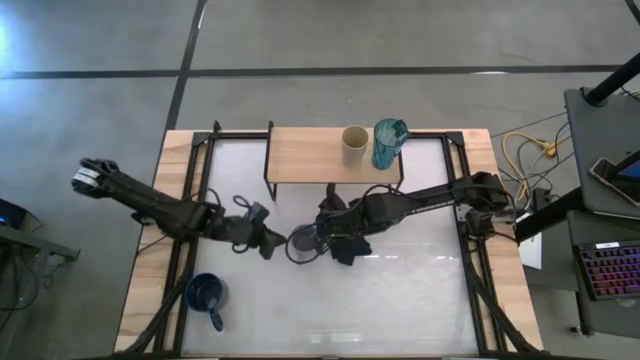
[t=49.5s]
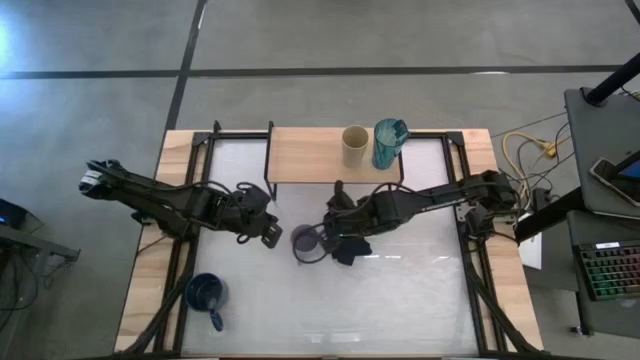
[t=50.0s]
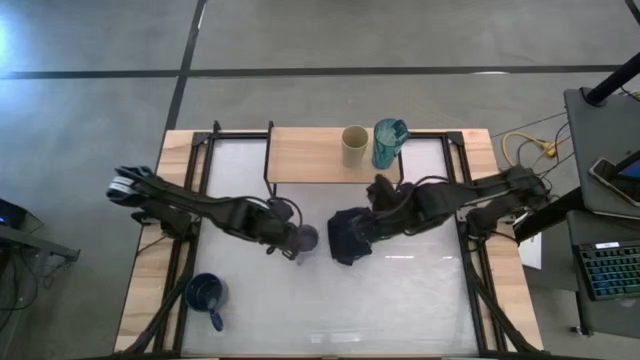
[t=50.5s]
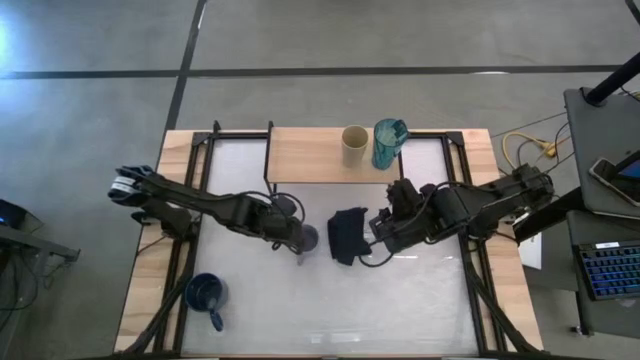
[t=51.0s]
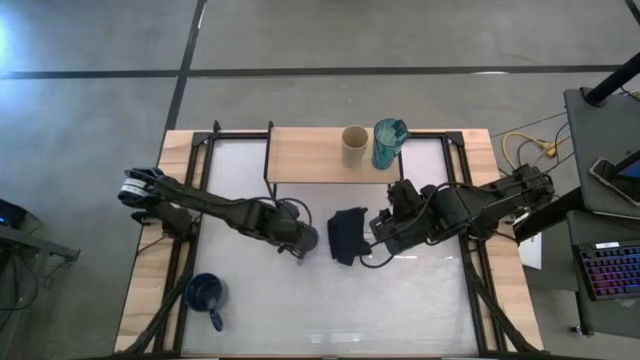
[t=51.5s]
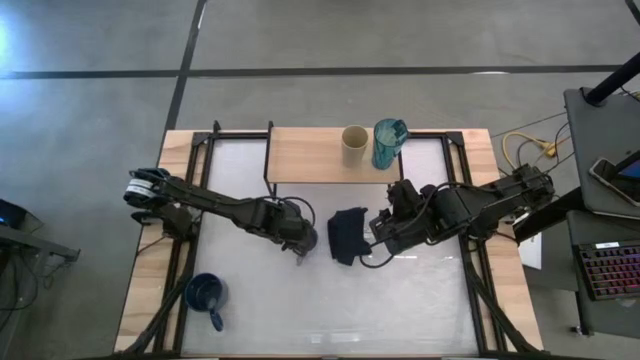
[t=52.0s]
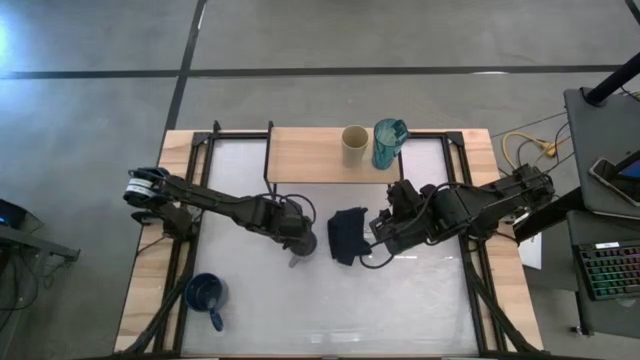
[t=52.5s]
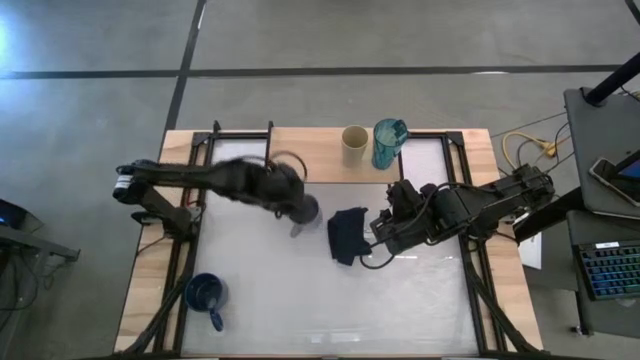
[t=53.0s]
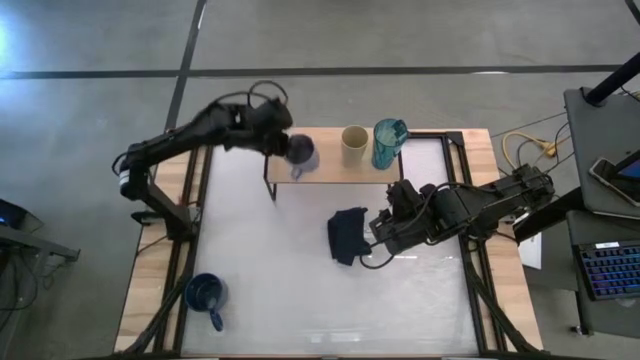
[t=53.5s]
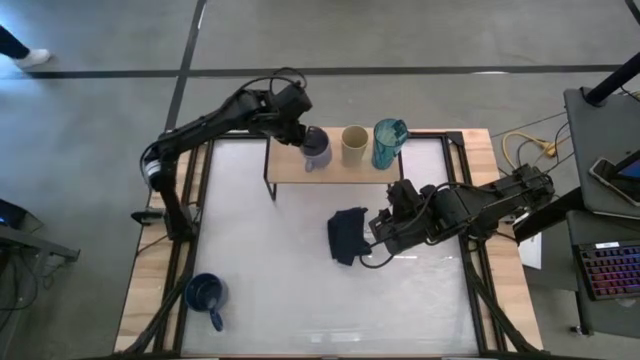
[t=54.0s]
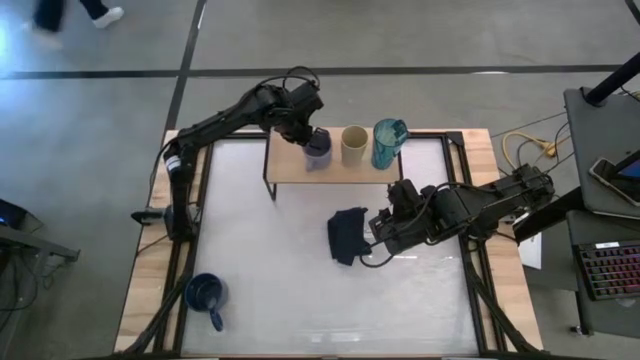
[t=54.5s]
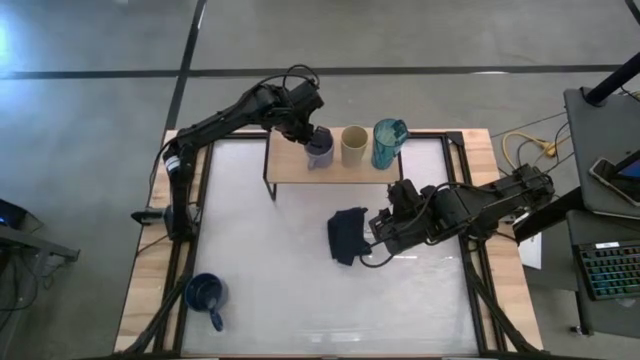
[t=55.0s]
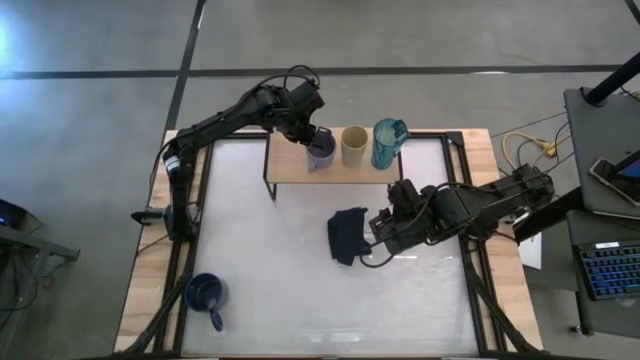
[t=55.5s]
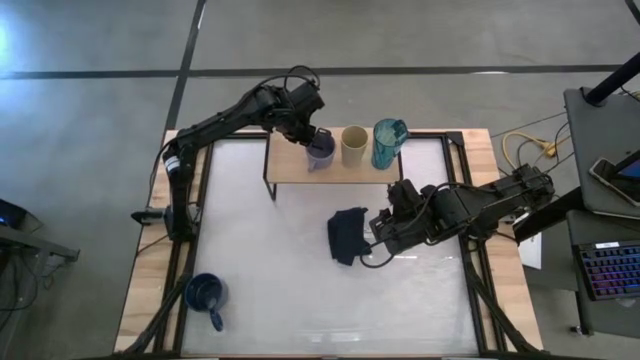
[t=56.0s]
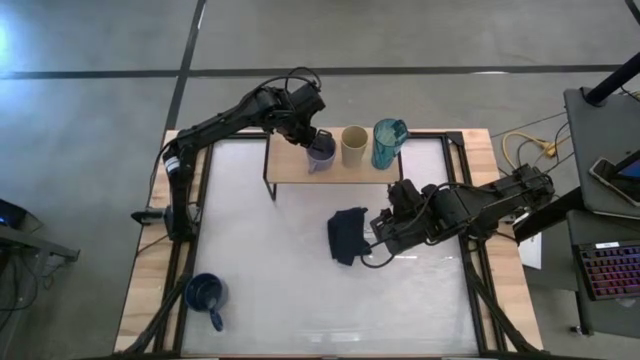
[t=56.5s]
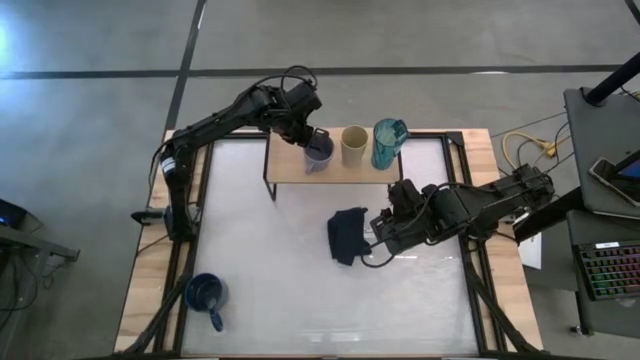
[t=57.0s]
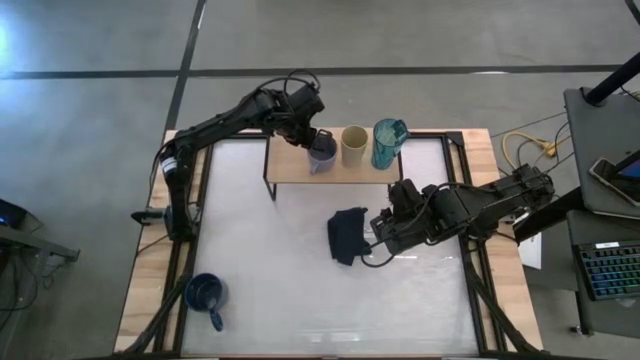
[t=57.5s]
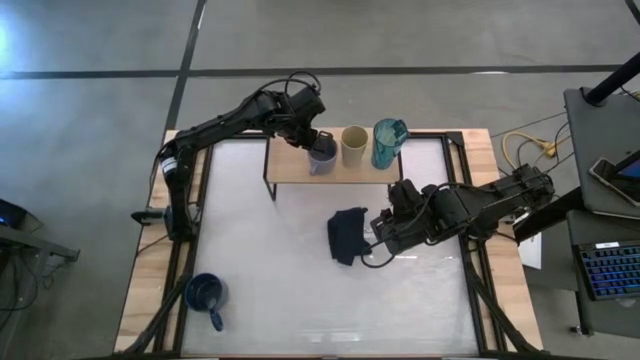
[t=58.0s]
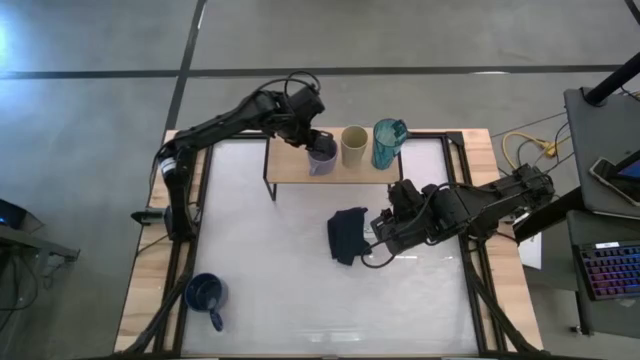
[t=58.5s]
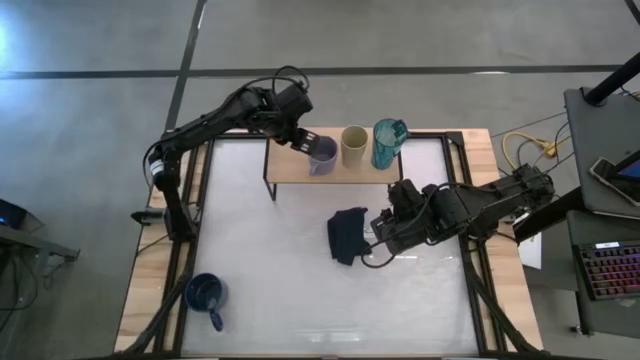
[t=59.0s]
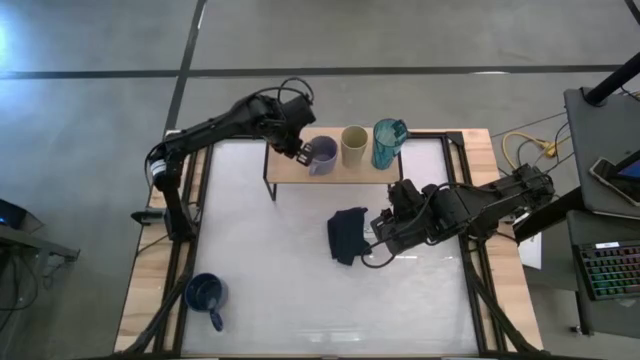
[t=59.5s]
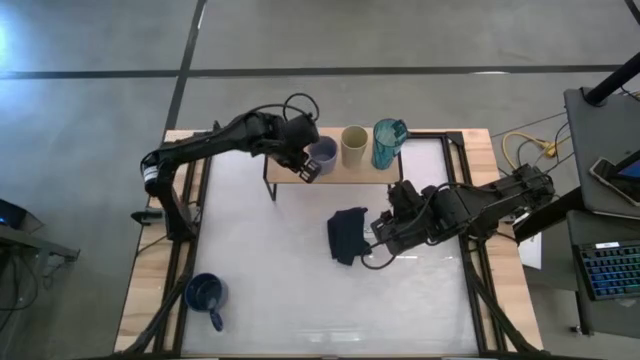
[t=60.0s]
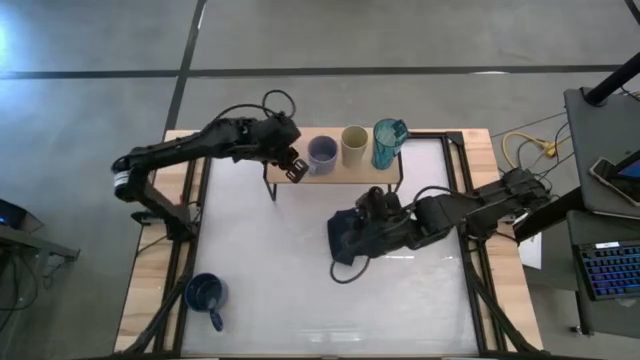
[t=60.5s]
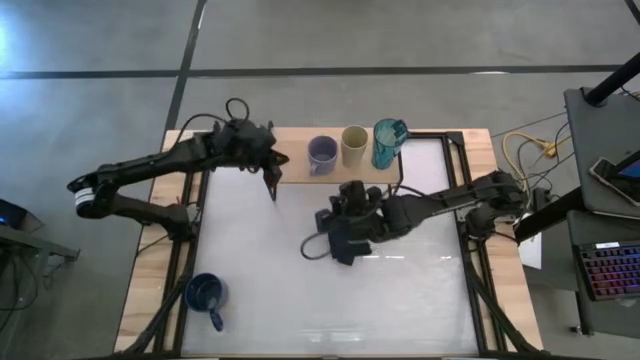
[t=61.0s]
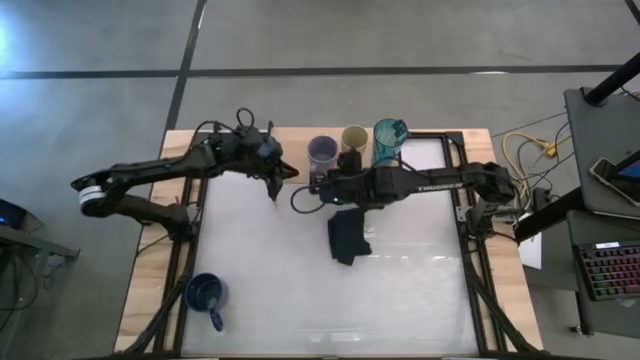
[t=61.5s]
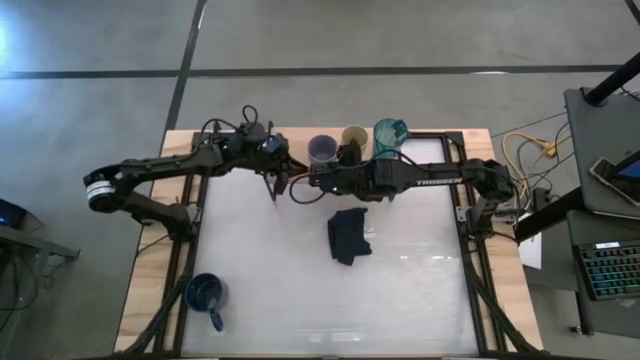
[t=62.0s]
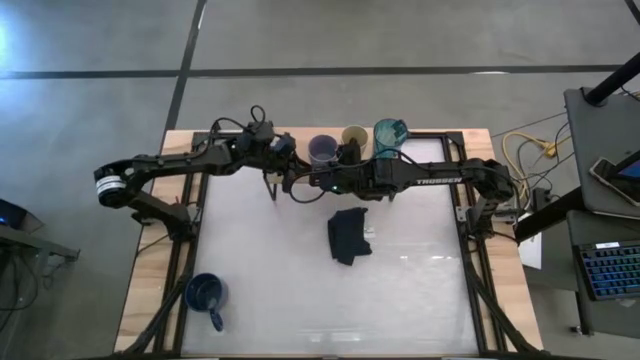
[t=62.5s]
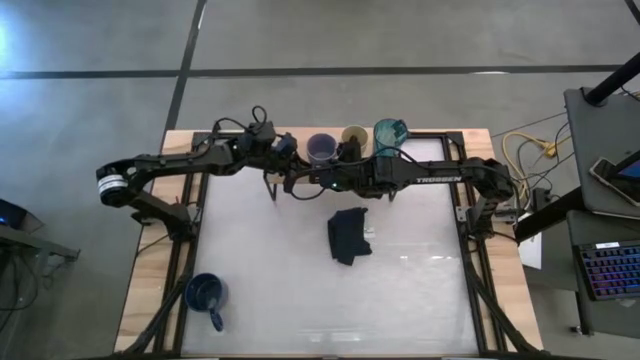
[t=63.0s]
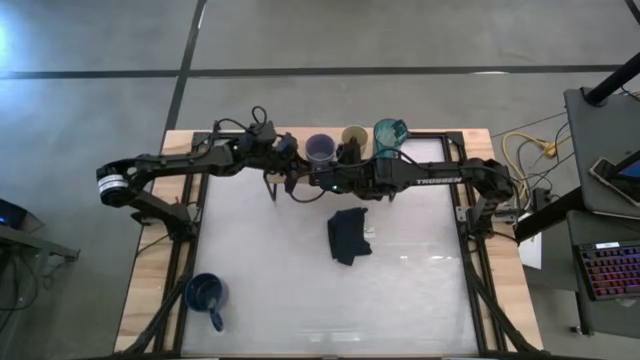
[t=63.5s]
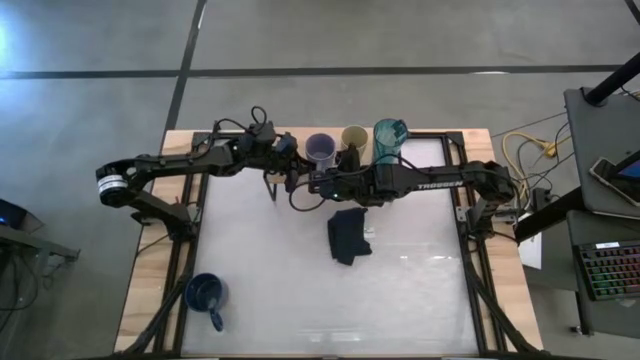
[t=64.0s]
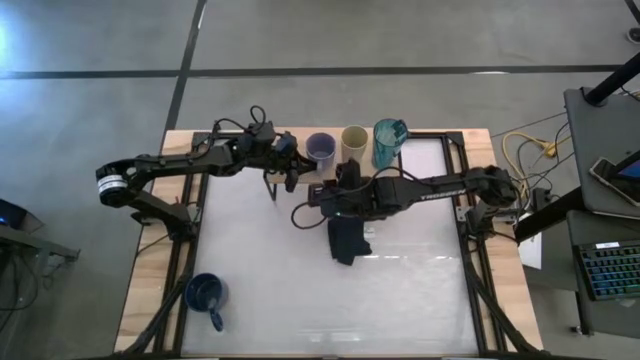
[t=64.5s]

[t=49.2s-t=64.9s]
Task: Stack small to large cups/mugs on shelf
Put the gray mug on the shelf

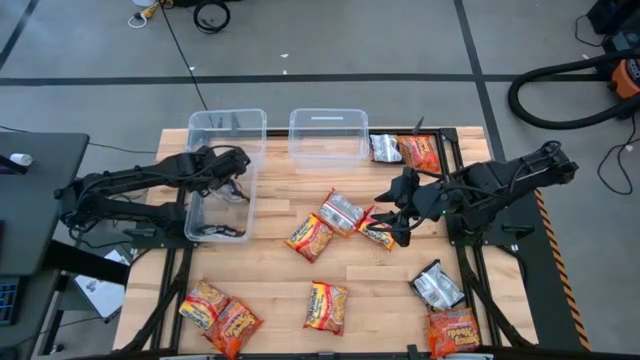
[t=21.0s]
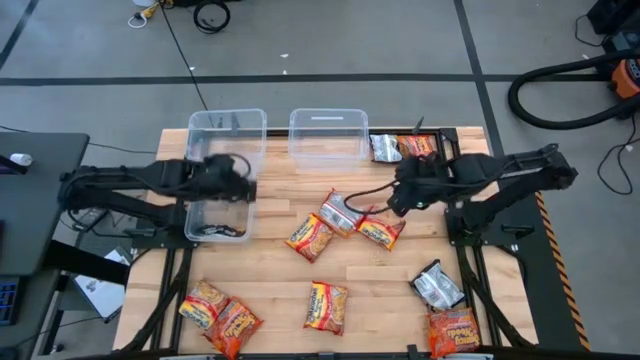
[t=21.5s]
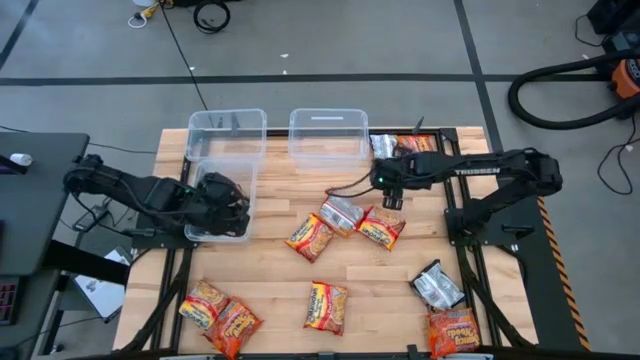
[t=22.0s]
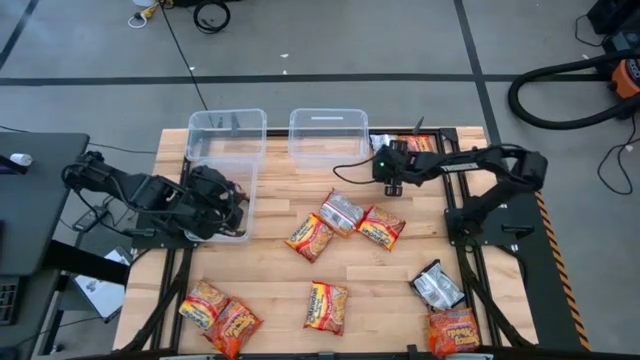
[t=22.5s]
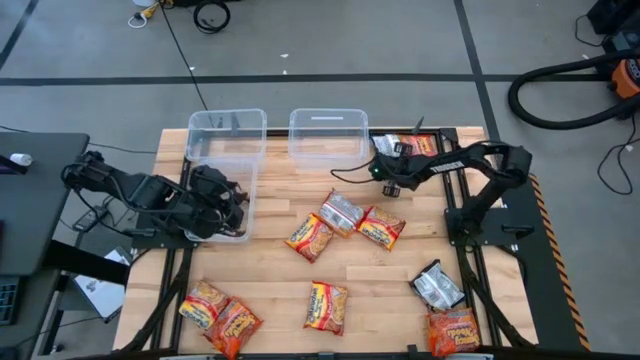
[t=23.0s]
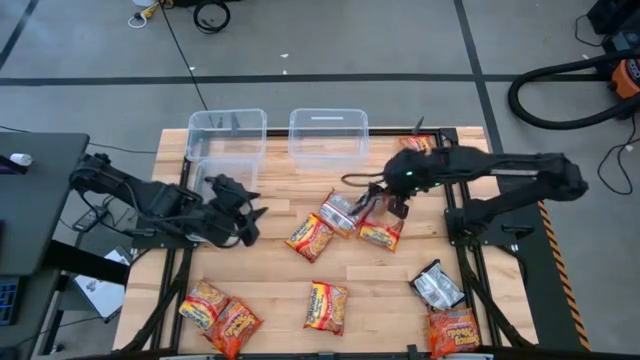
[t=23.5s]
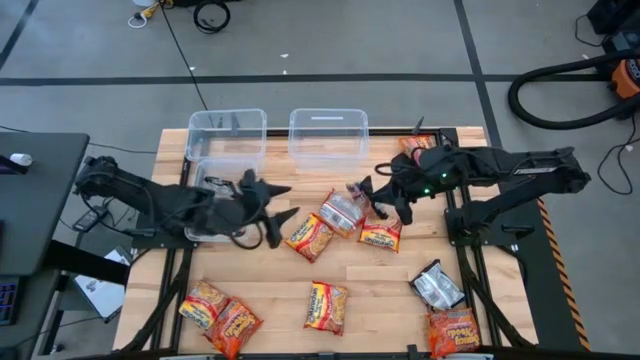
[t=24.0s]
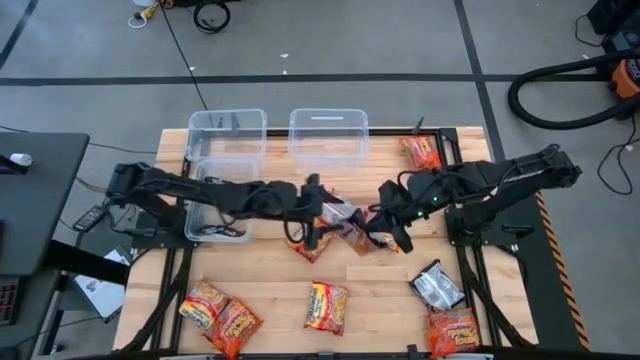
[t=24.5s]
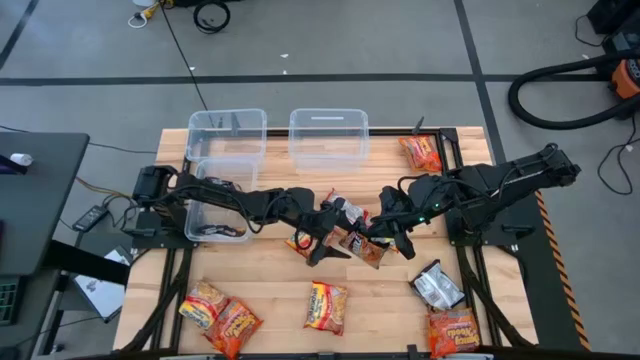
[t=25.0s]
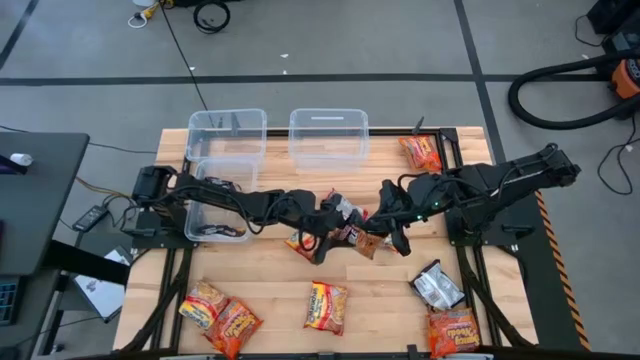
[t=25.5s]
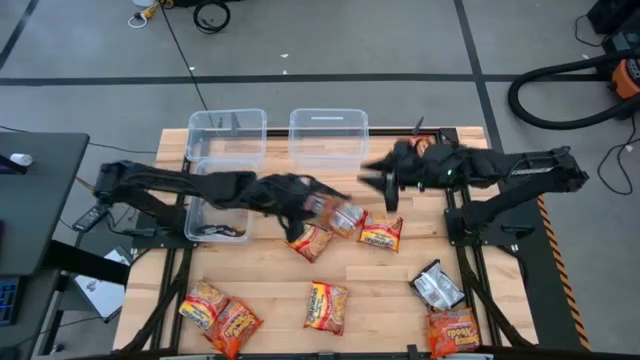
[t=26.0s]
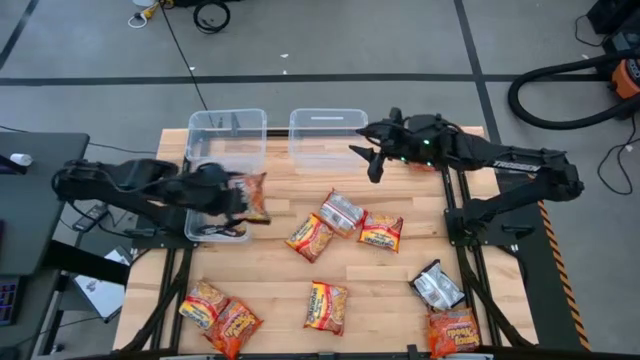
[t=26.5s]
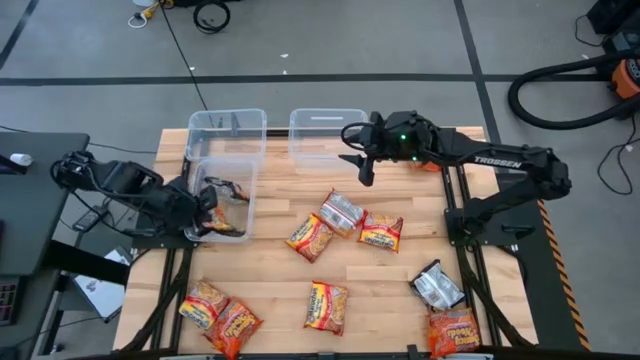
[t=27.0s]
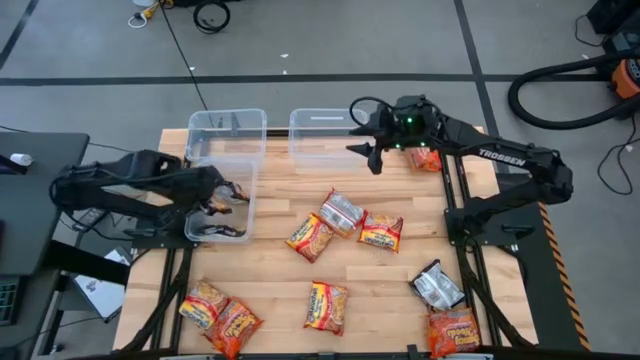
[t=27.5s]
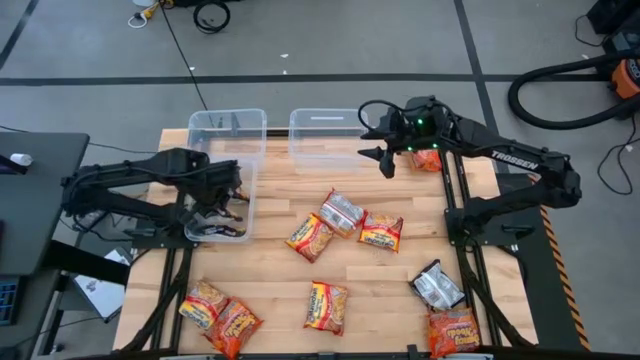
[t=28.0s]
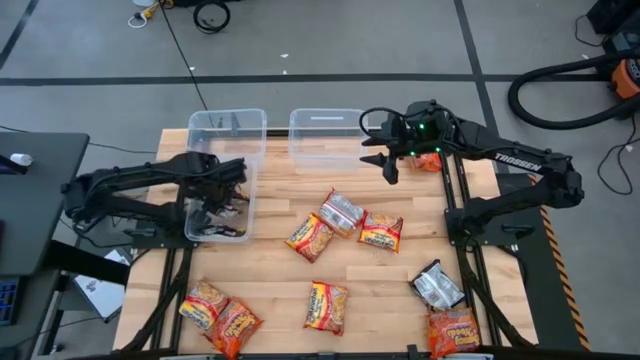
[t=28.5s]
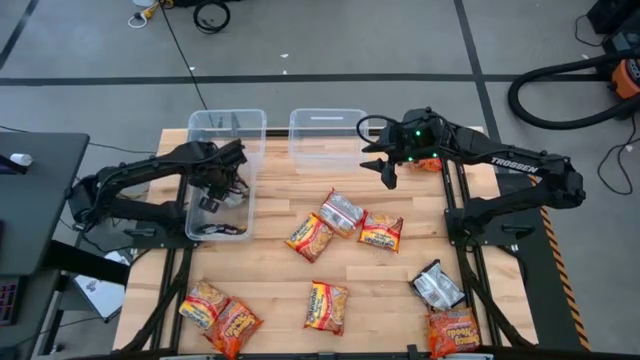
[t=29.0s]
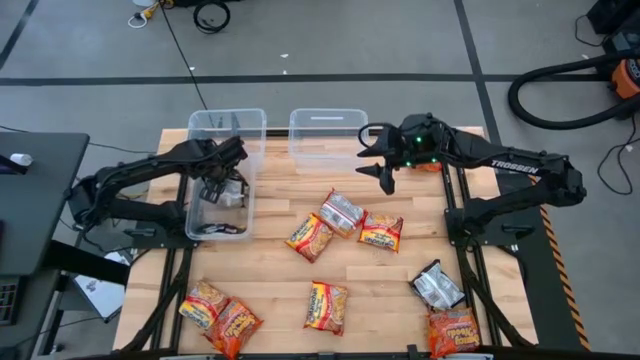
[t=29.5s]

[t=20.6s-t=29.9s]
Task: Sort Maruchan noodles
Put the top black noodle pack into the bottom transparent bin
